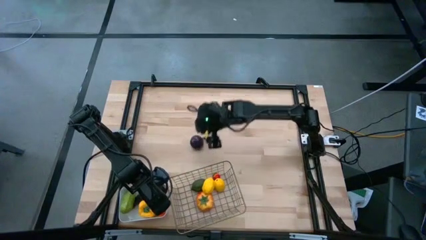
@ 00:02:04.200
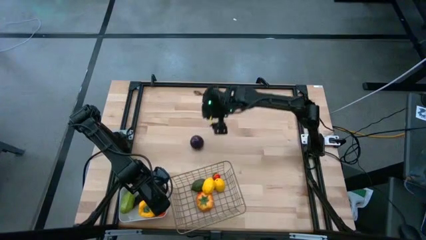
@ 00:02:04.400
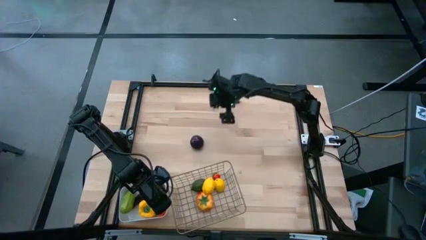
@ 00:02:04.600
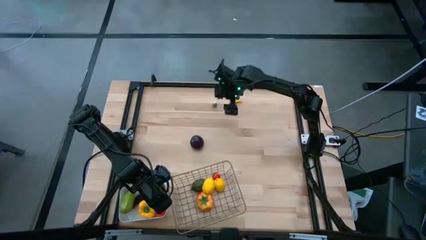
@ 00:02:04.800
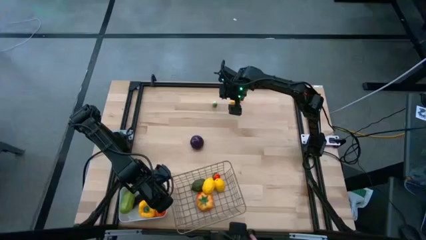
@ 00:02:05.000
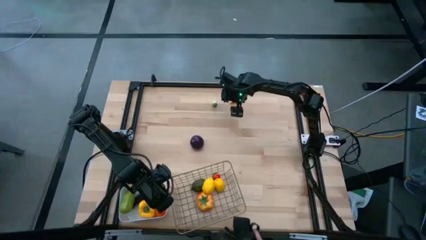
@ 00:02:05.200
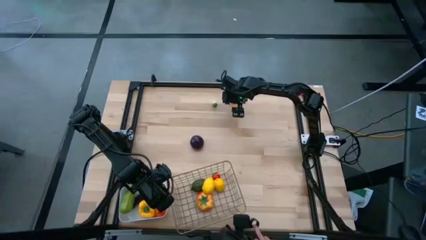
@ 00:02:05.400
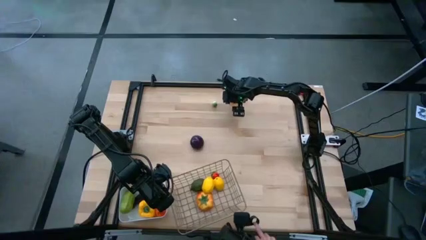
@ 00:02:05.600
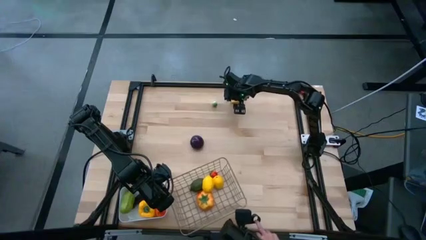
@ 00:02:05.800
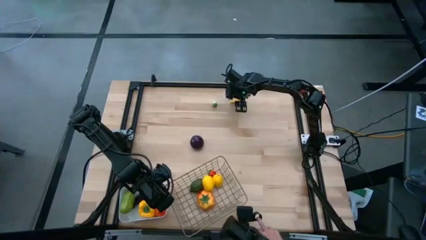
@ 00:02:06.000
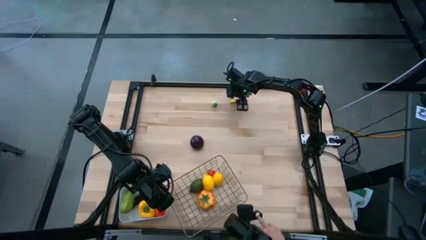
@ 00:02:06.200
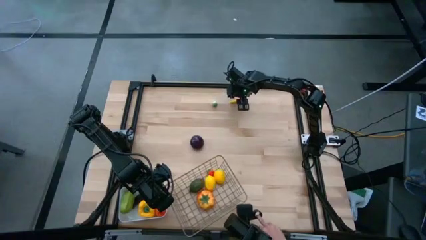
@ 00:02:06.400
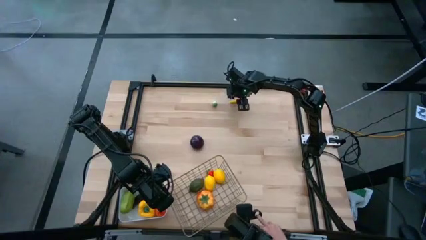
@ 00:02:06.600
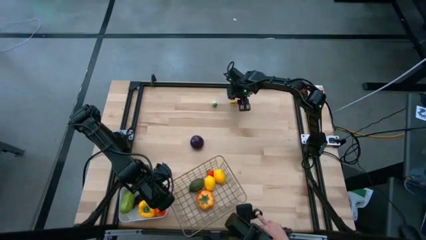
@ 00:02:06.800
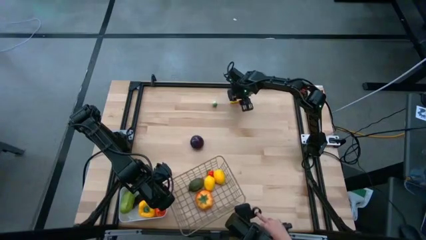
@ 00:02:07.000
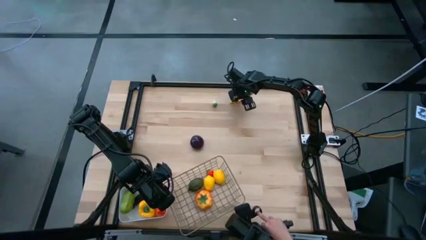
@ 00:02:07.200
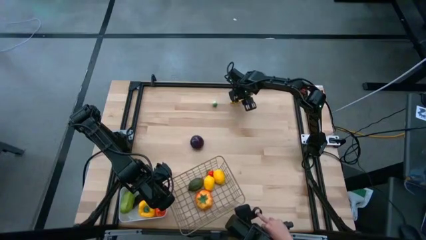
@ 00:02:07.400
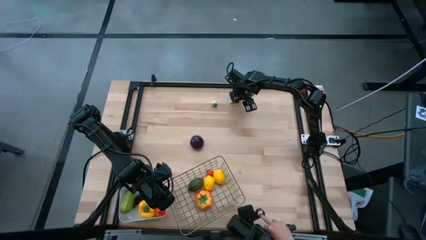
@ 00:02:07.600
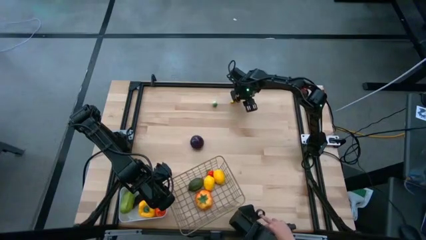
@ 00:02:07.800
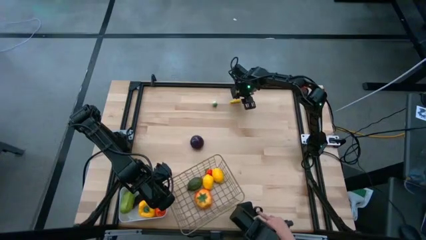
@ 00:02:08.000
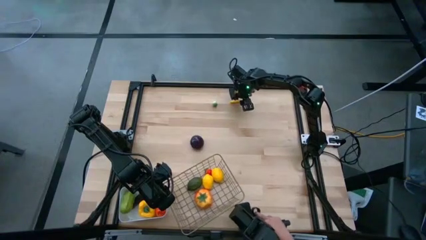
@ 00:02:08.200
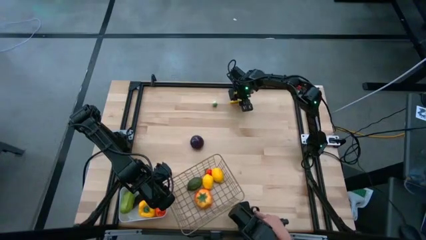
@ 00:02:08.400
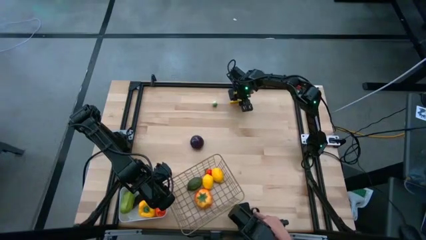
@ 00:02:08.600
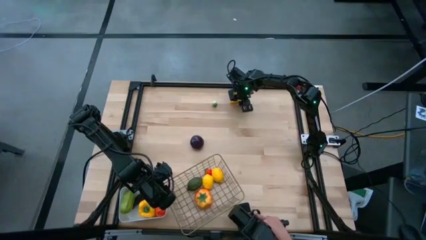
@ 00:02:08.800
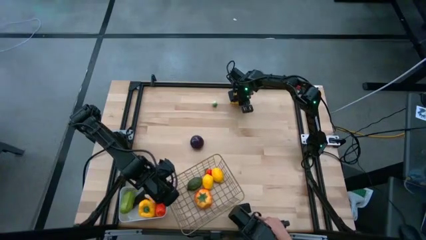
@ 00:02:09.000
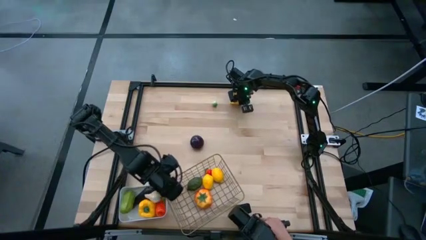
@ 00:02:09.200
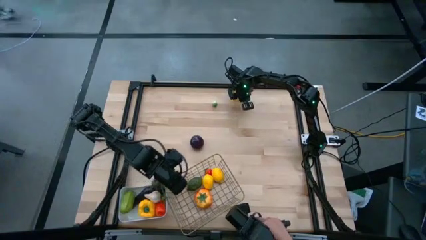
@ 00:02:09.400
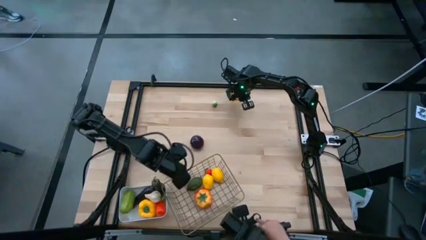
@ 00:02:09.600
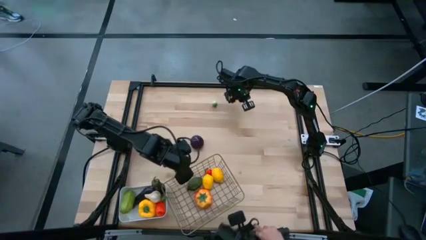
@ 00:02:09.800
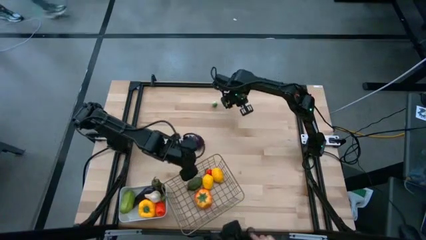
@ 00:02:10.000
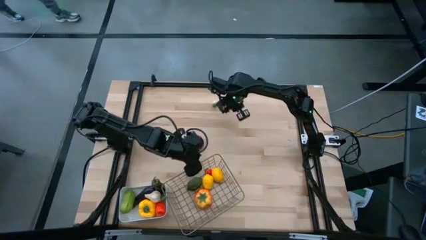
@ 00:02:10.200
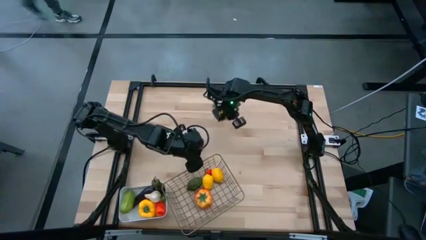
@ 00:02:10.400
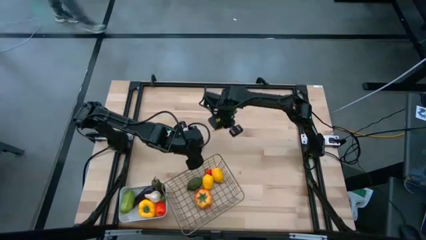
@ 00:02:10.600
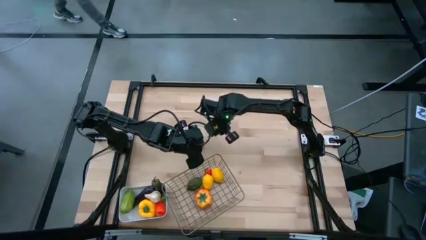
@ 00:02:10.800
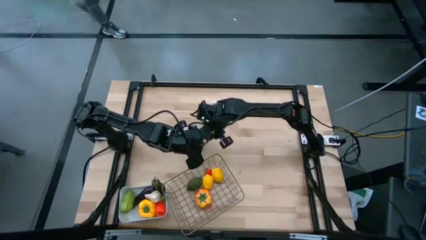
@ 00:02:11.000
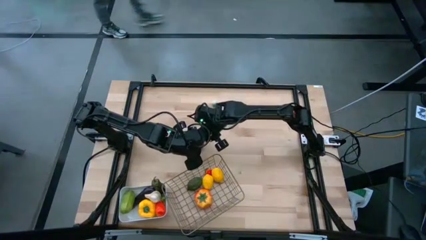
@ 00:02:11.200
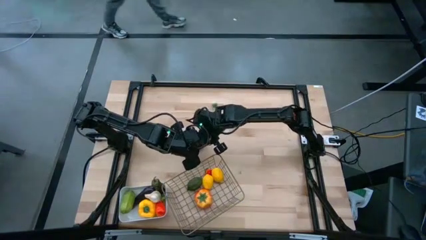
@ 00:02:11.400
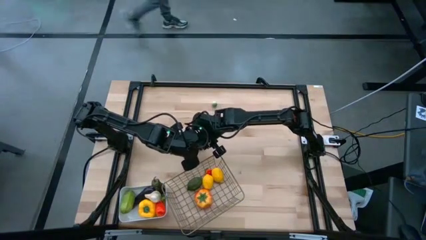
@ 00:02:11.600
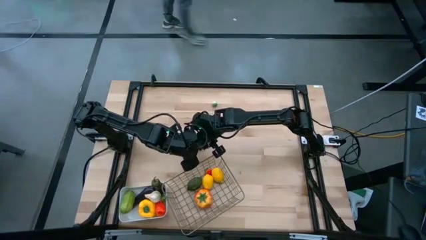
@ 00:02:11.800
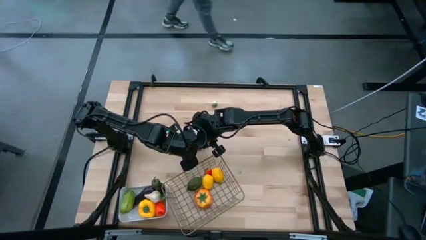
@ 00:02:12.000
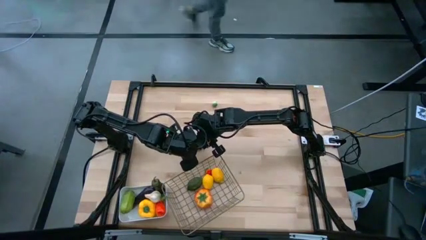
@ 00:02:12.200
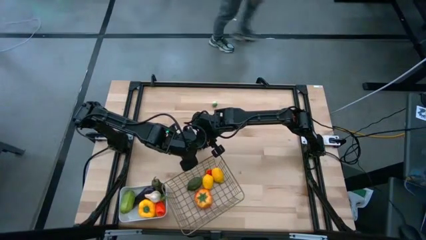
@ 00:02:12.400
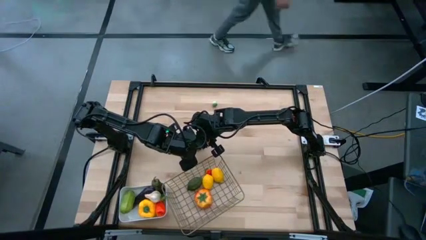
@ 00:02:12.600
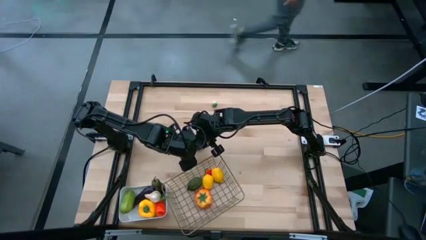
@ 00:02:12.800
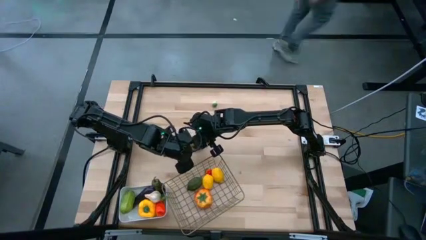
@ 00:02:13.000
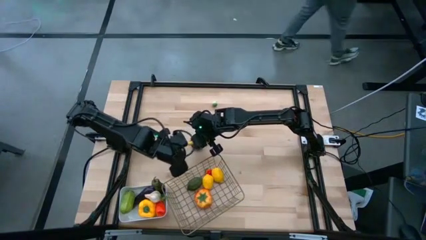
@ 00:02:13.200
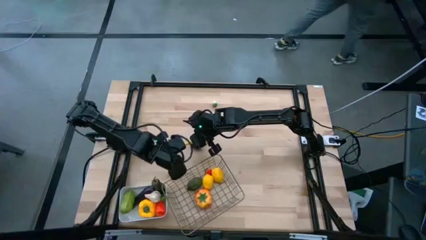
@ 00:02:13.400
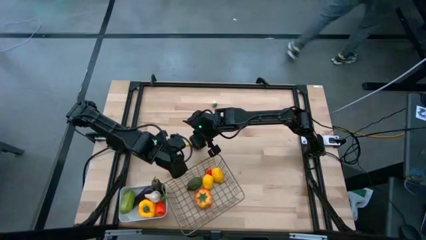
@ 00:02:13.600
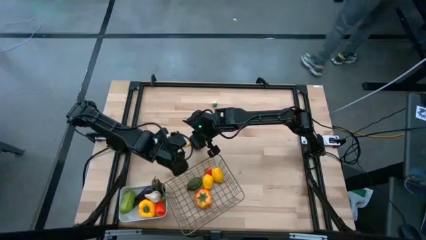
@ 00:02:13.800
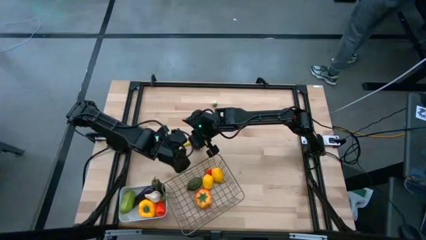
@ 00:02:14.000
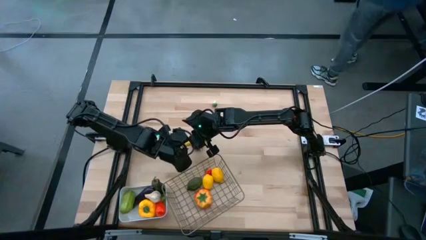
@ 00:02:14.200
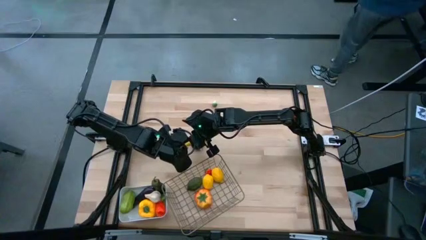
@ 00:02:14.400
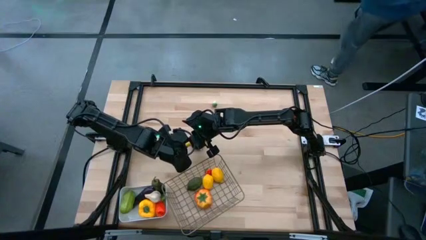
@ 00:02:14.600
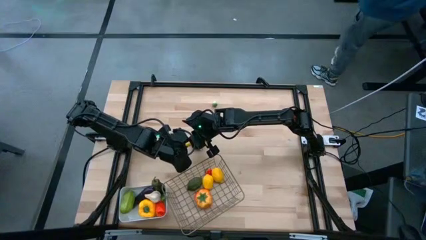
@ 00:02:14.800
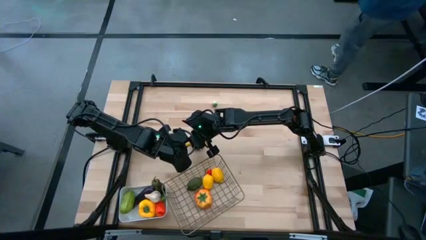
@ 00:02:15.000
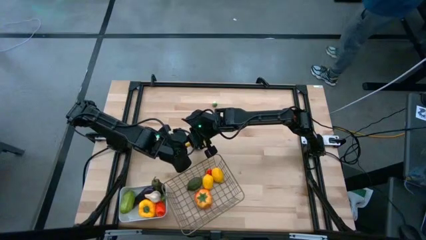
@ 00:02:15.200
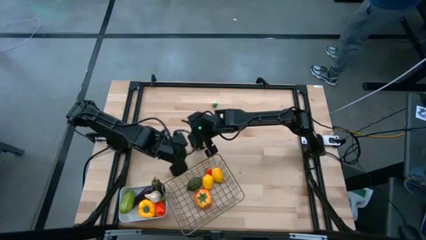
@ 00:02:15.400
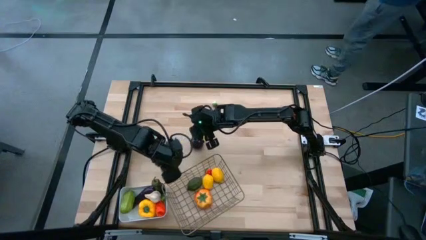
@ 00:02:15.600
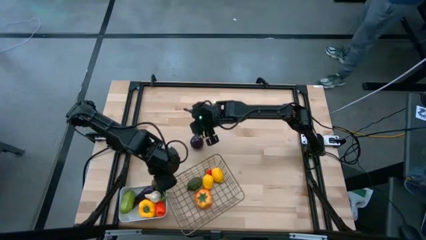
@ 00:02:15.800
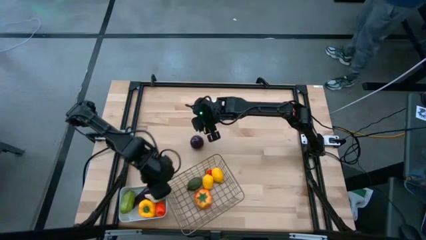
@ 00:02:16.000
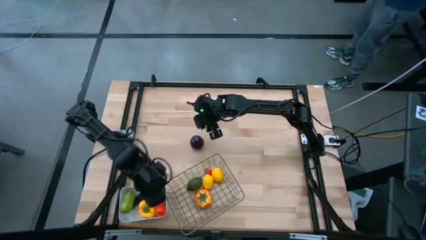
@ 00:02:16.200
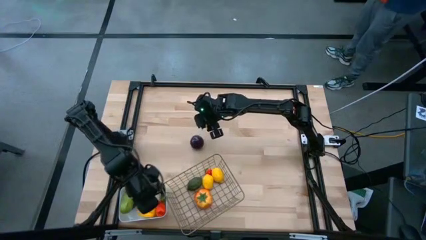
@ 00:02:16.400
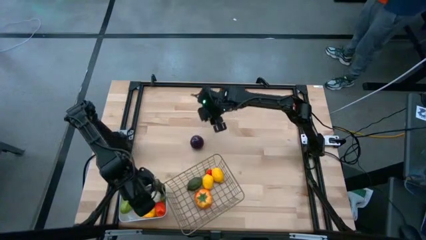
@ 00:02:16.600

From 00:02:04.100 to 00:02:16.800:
Task: Sort produce into baskets
Put the yellow corn into the white bin

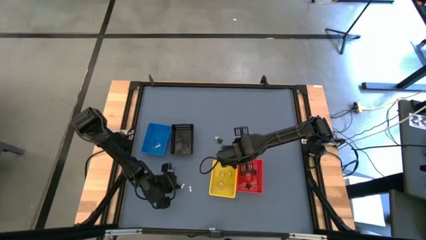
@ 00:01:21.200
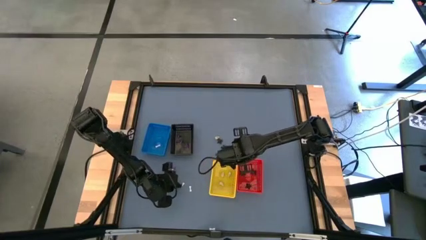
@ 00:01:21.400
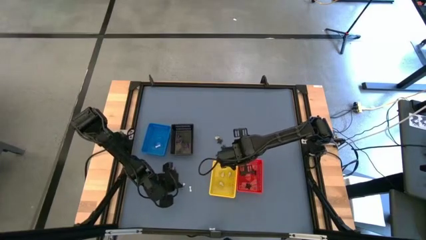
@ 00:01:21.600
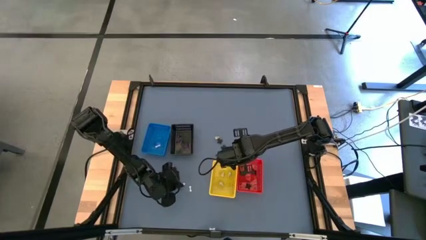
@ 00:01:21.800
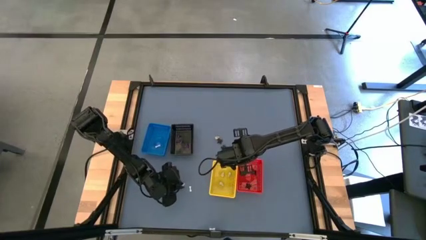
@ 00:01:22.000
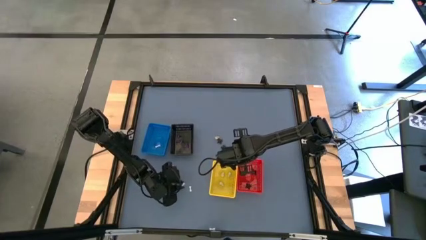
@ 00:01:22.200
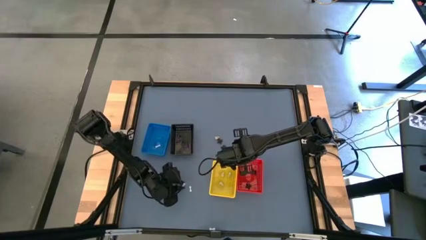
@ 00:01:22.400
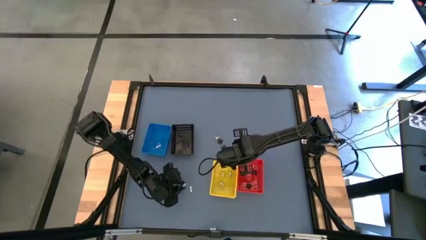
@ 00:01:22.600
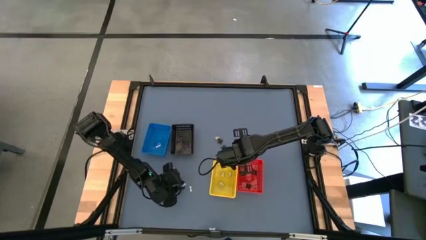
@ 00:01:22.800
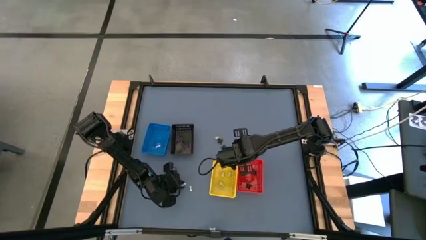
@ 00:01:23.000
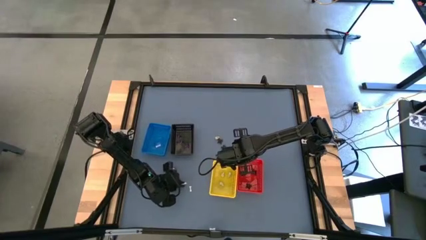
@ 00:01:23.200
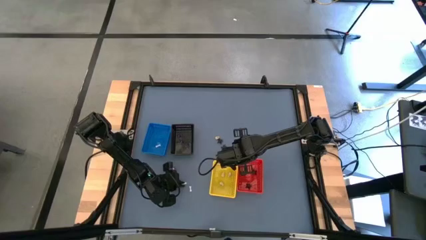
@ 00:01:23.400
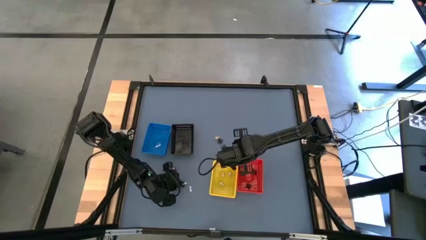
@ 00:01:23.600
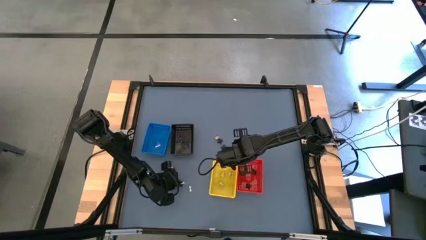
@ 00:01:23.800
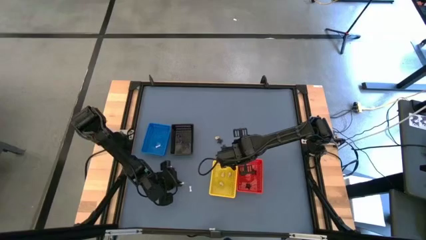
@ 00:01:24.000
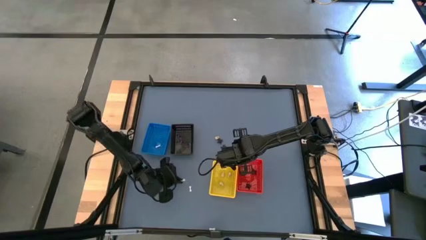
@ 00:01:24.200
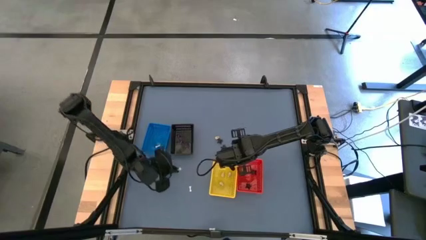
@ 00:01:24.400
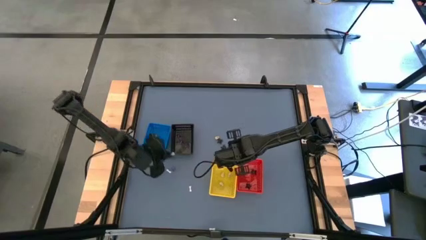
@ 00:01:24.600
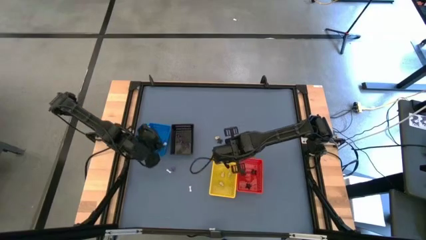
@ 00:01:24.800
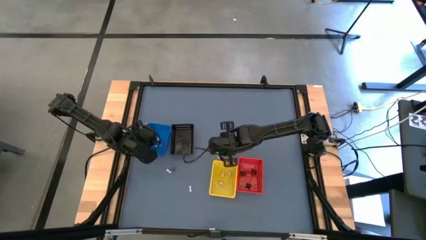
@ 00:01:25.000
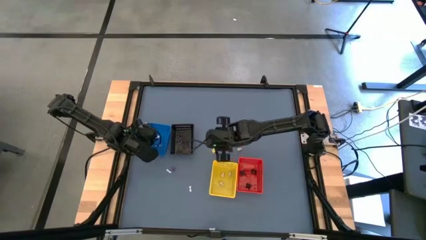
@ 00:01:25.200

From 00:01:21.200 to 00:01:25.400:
Task: Sort Halloween decoration
Put the bone toy into the blue bin
